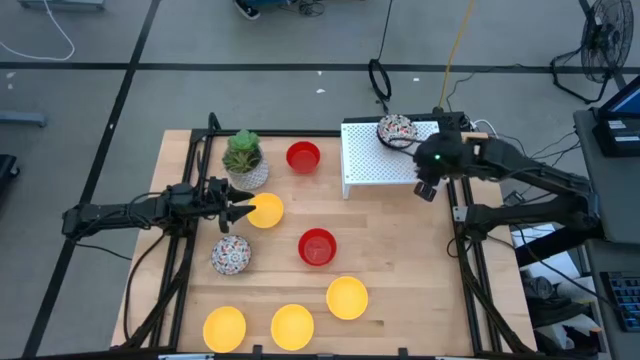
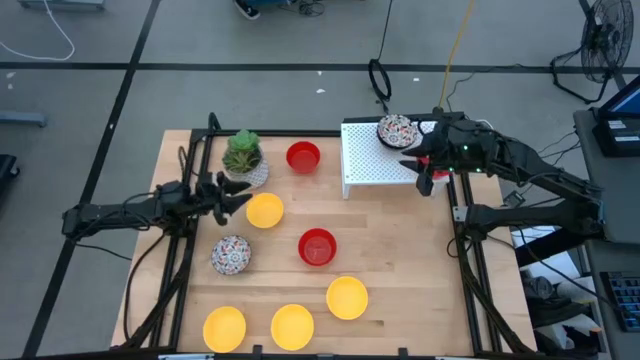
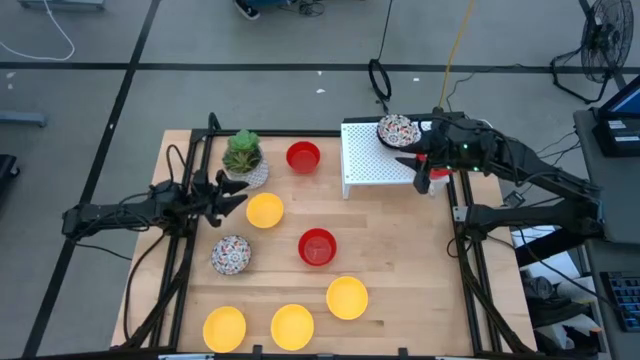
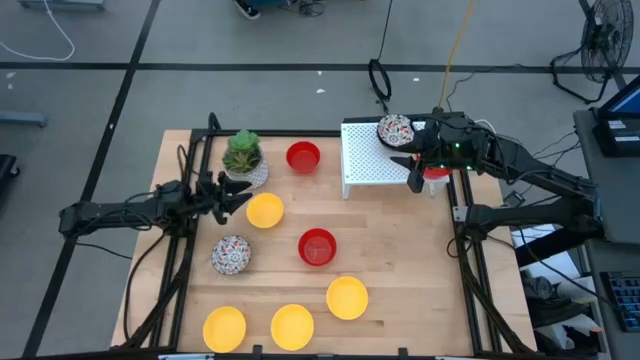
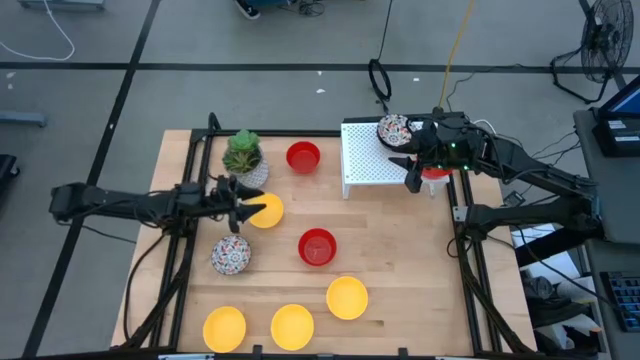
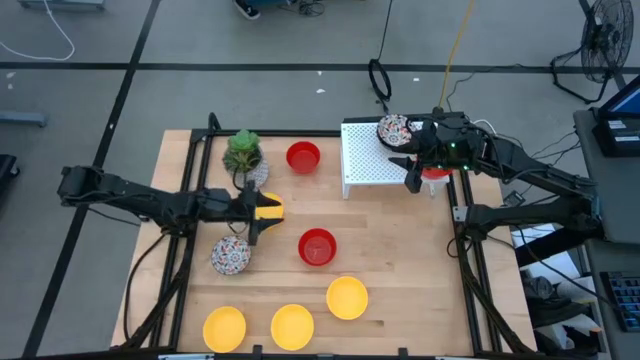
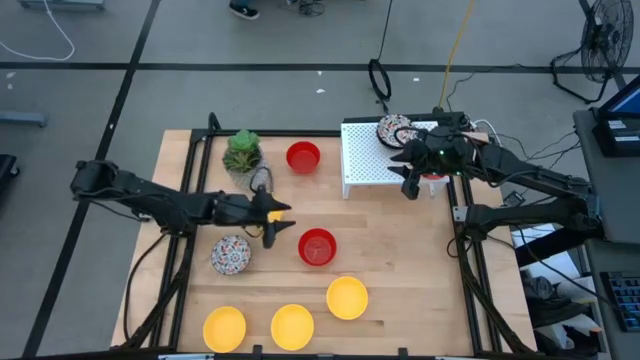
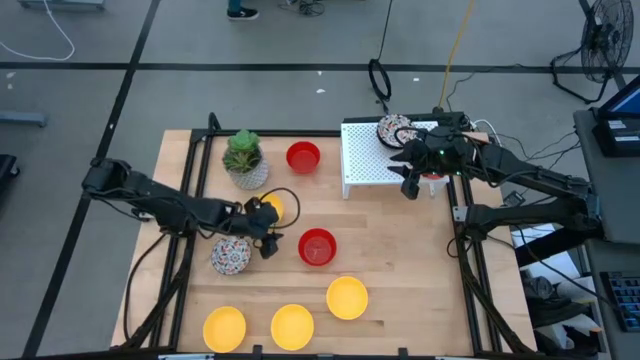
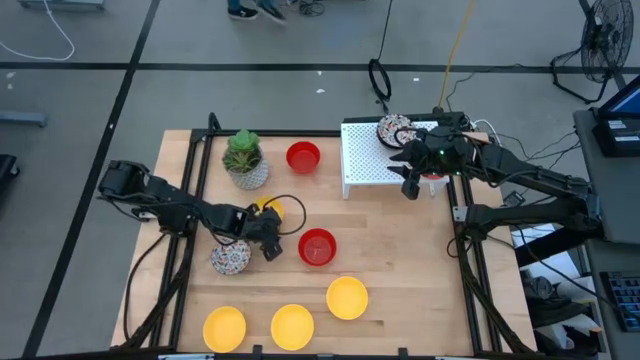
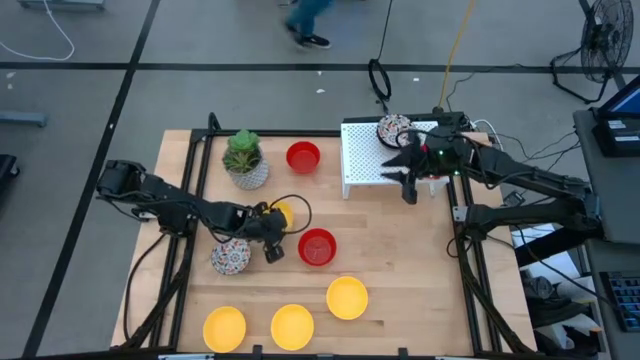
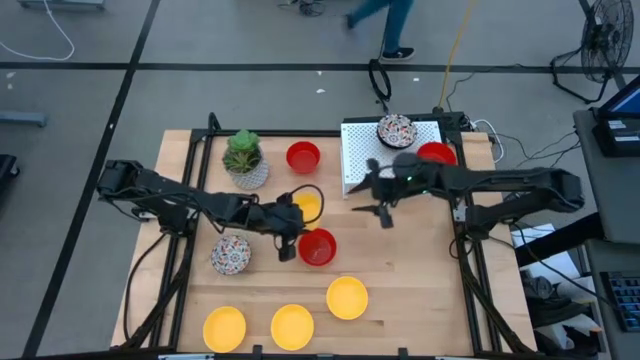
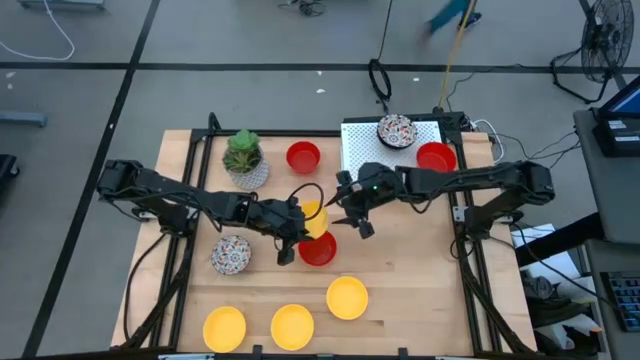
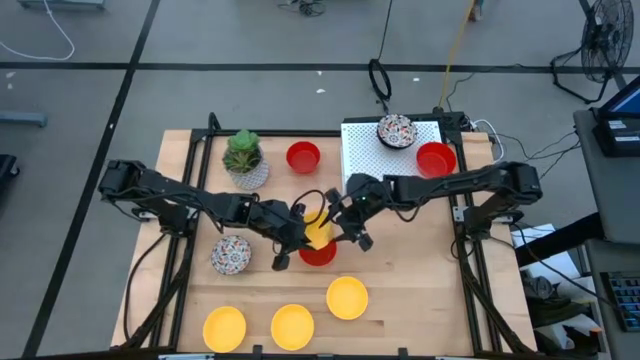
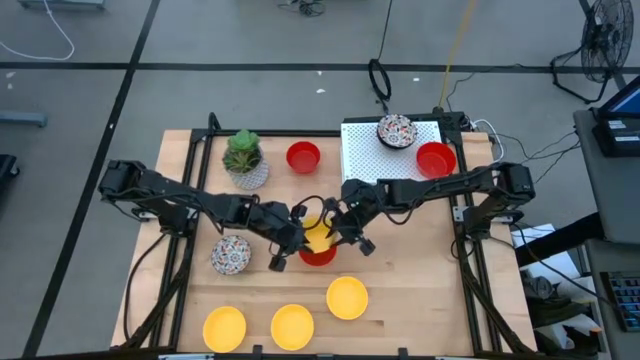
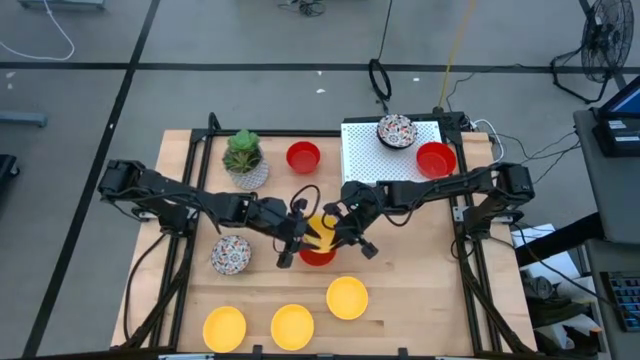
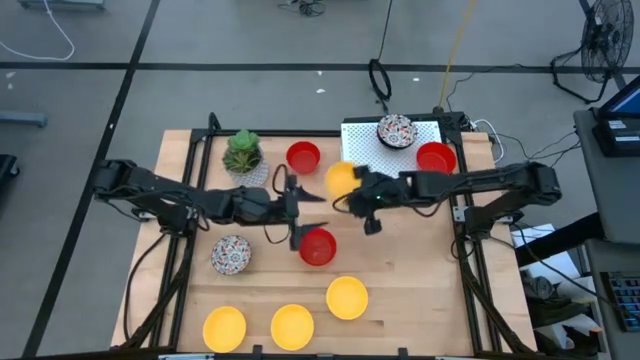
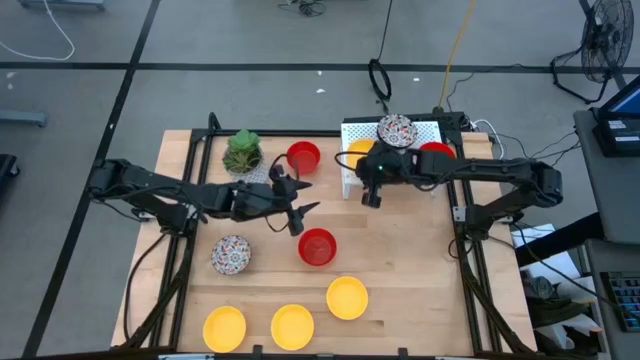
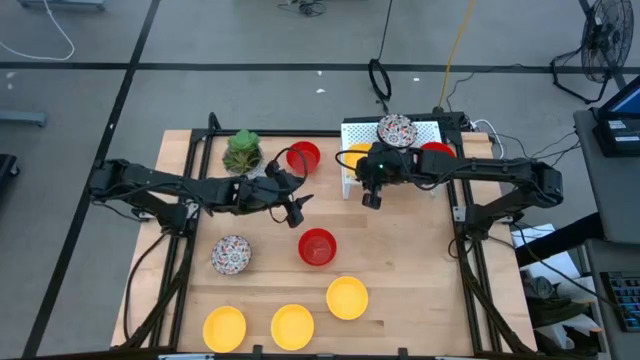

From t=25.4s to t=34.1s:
Task: Pick & Place Mini bowls
Put the yellow bowl on the shelf

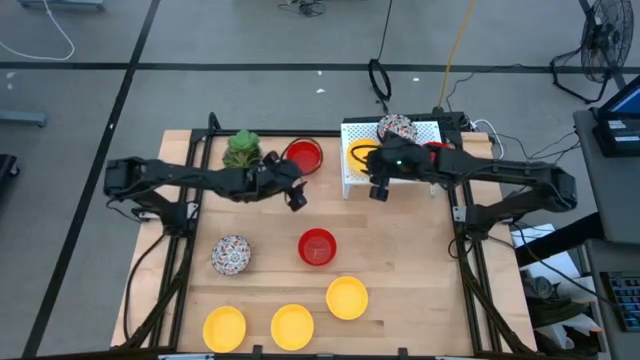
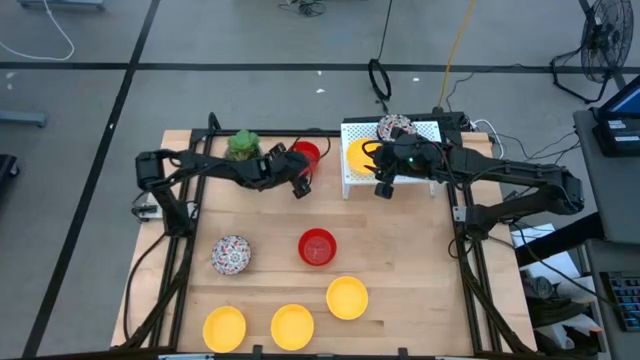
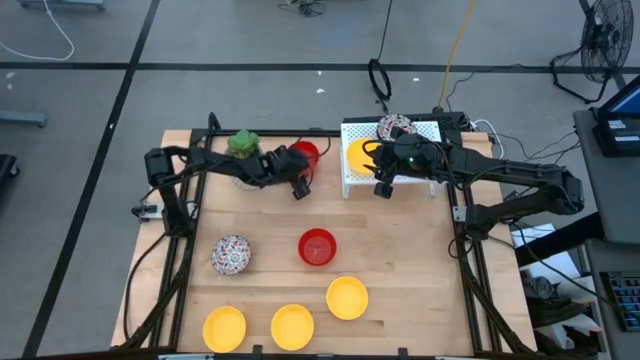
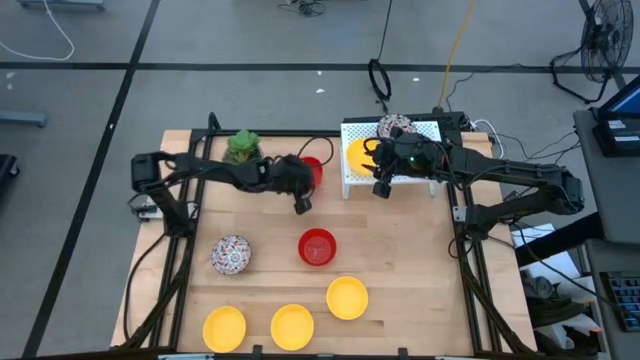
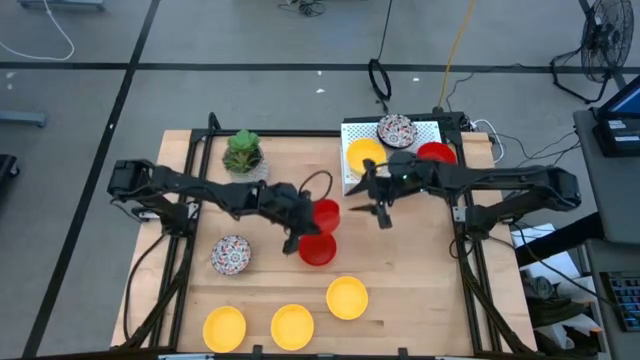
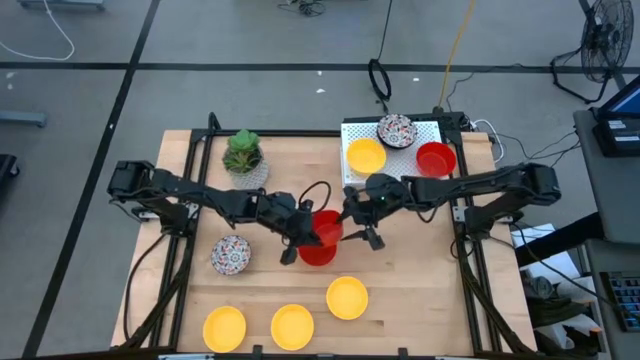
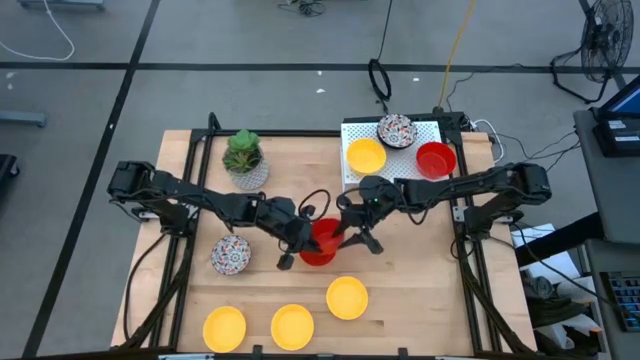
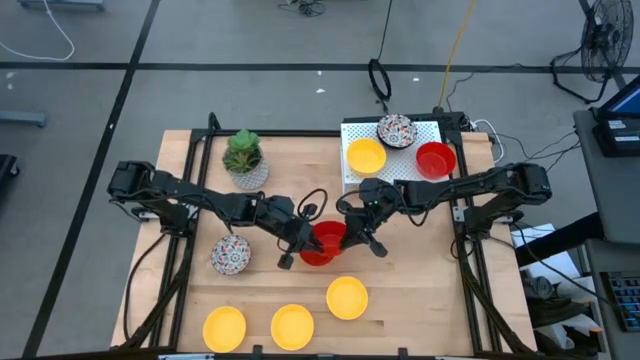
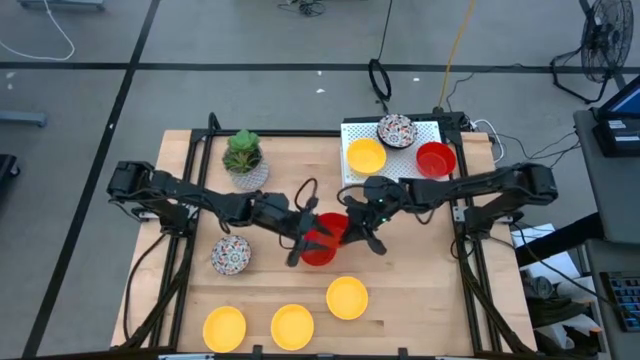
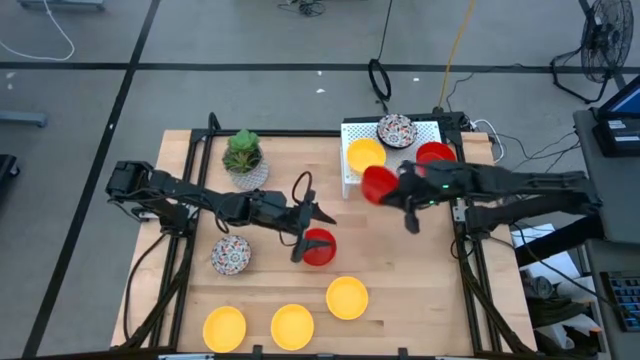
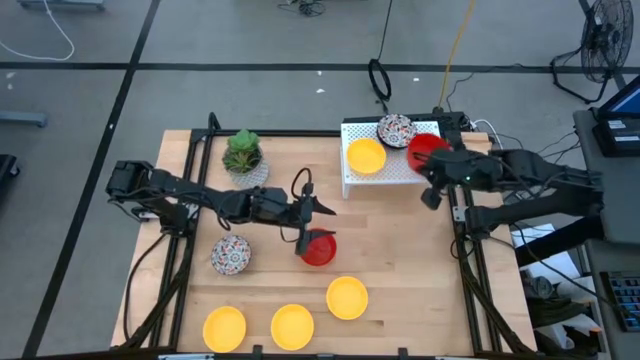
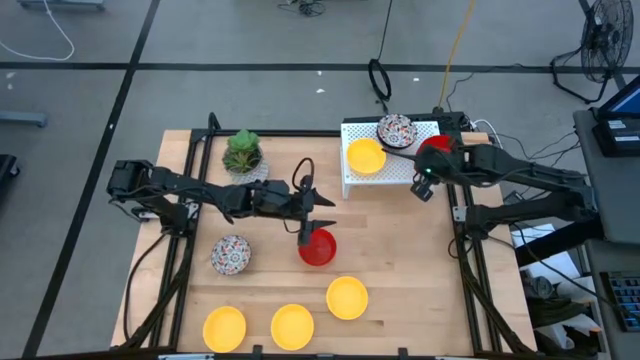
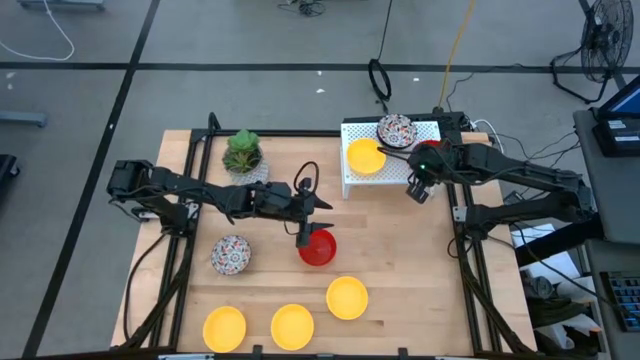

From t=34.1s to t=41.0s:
Stack the red bowl on top of the red bowl on the shelf

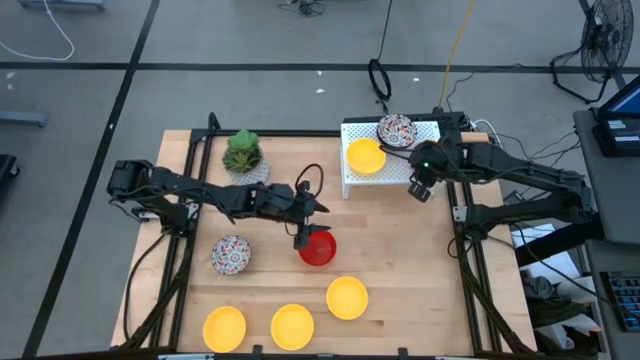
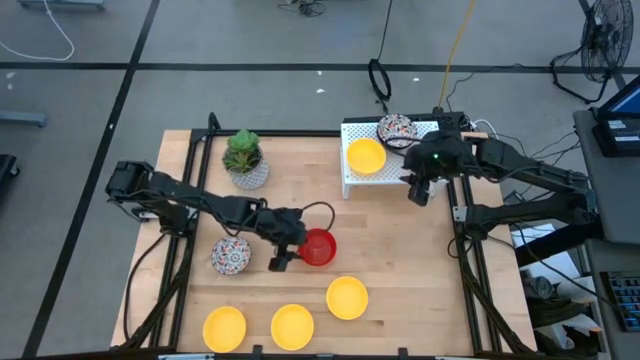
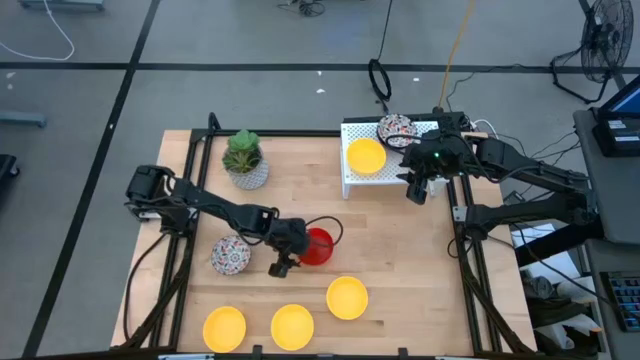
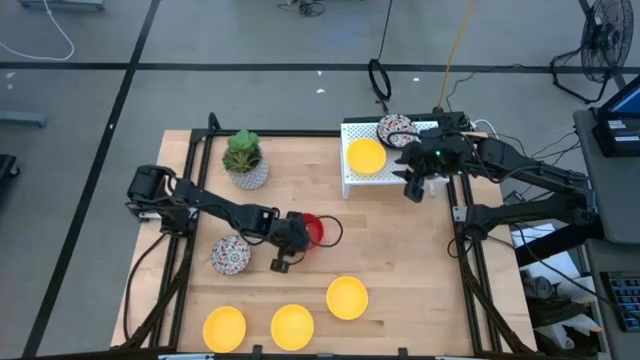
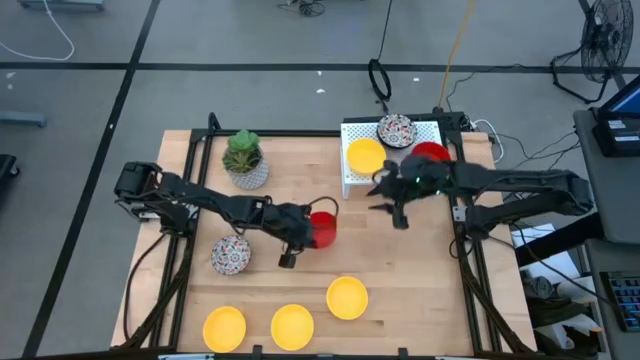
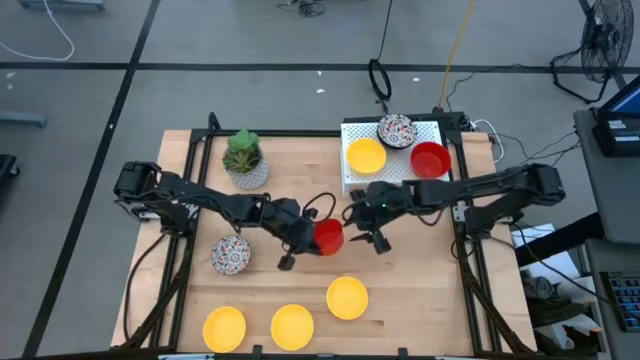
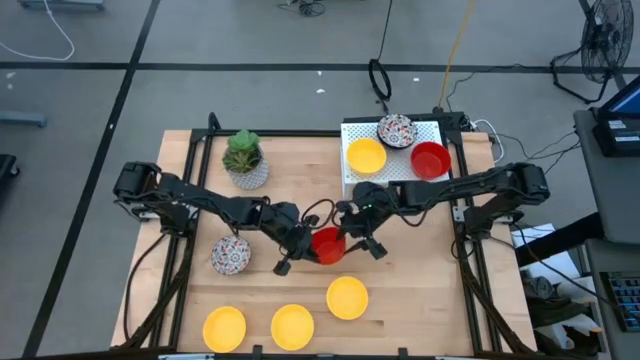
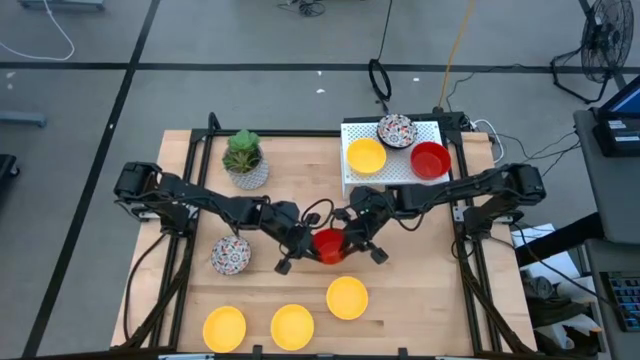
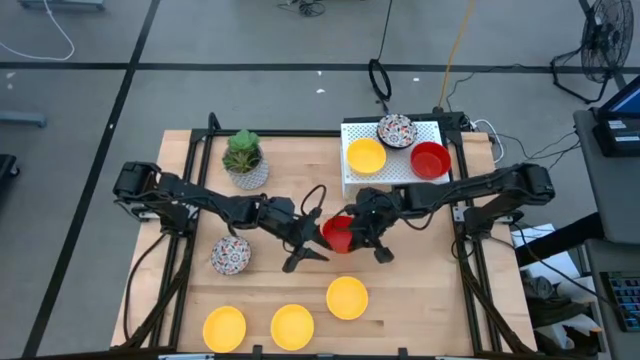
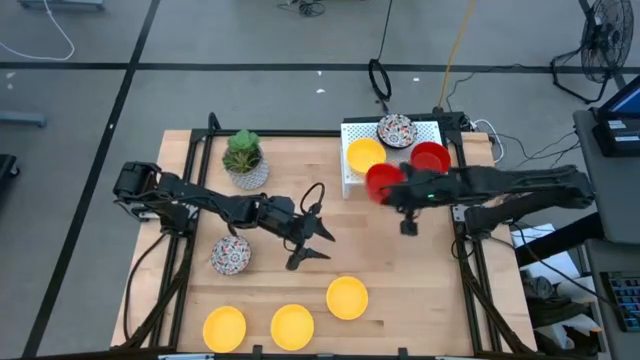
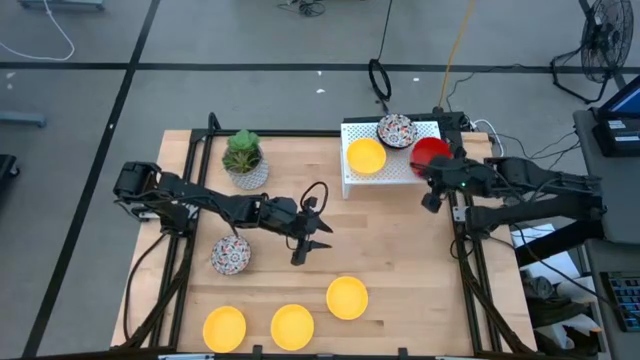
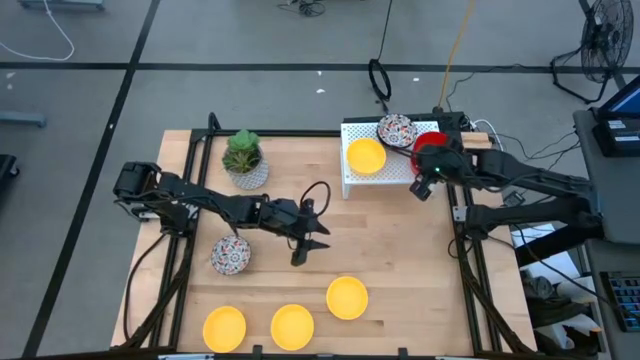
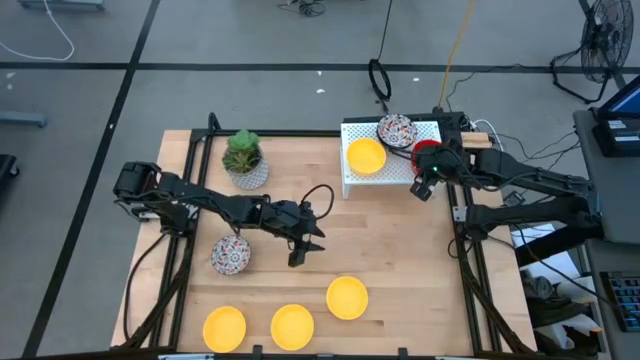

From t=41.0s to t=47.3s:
Stack the red bowl on top of the red bowl on the shelf
